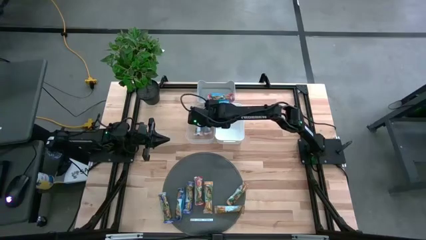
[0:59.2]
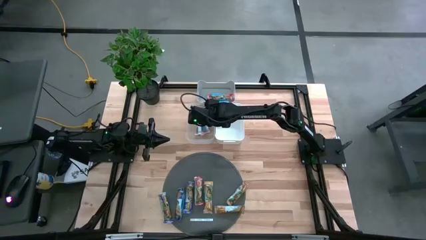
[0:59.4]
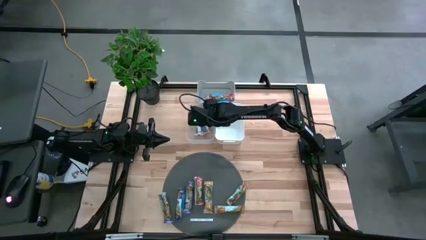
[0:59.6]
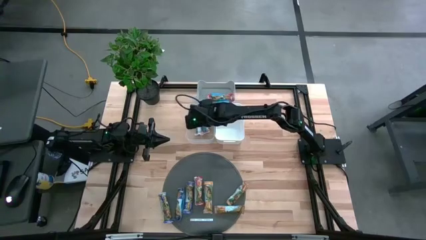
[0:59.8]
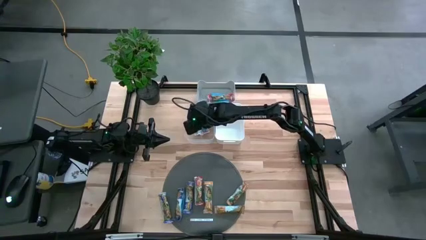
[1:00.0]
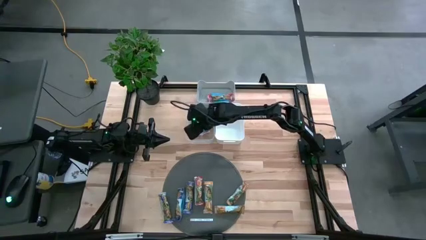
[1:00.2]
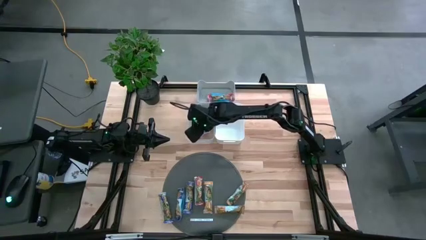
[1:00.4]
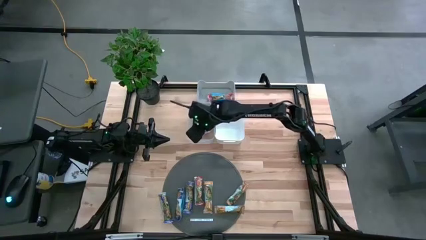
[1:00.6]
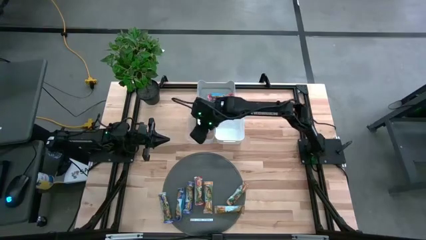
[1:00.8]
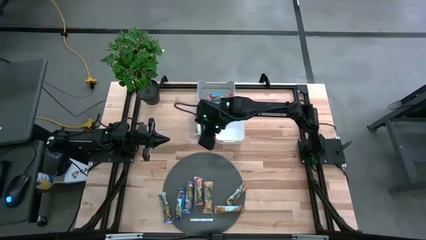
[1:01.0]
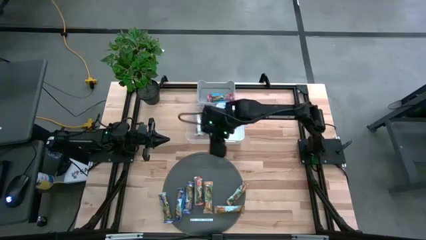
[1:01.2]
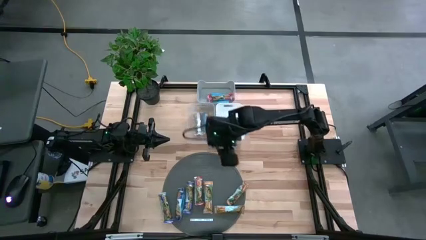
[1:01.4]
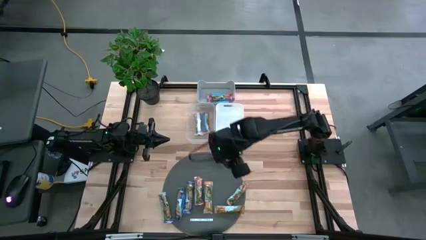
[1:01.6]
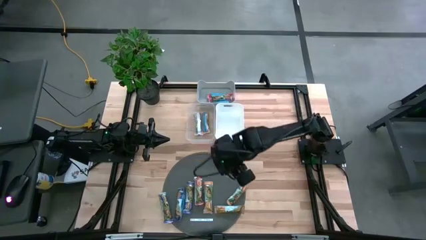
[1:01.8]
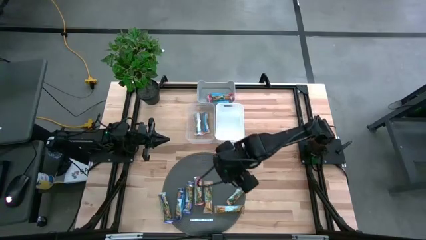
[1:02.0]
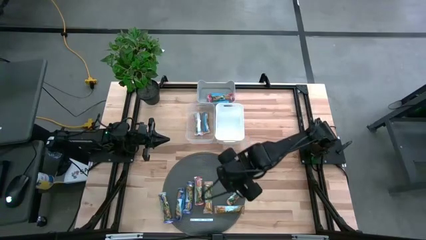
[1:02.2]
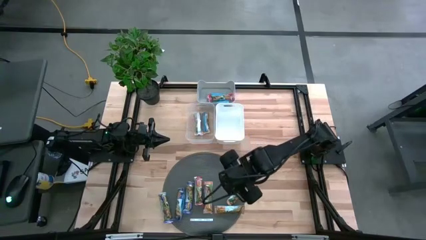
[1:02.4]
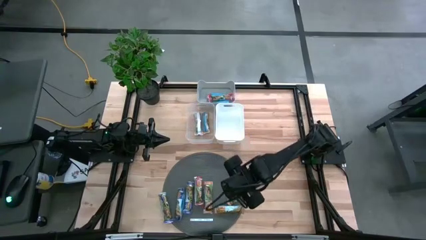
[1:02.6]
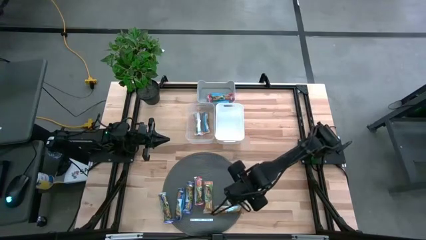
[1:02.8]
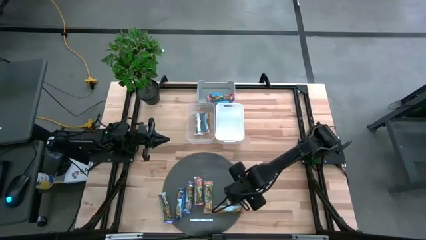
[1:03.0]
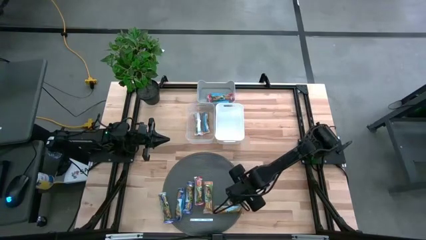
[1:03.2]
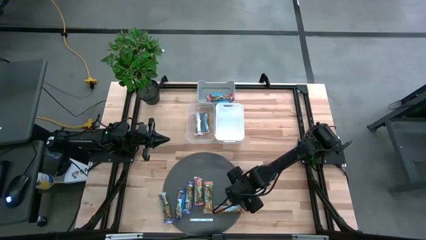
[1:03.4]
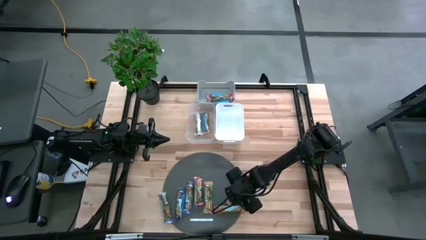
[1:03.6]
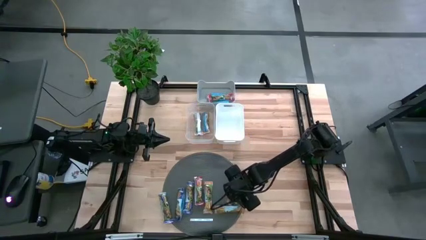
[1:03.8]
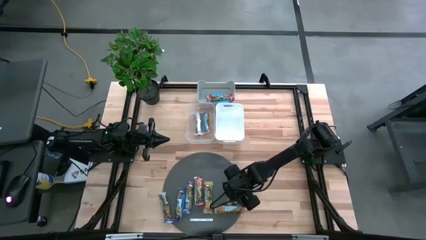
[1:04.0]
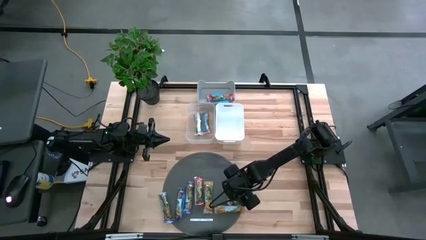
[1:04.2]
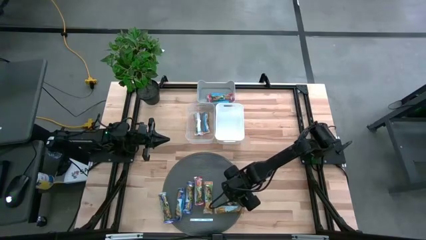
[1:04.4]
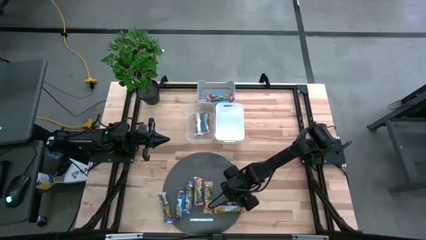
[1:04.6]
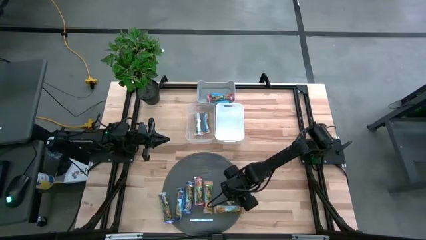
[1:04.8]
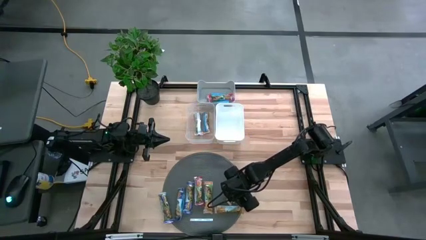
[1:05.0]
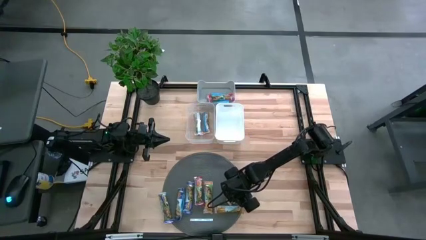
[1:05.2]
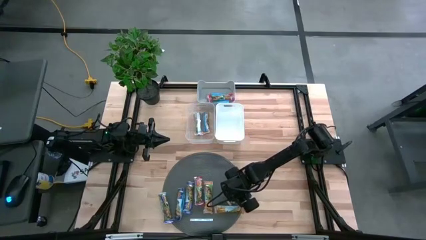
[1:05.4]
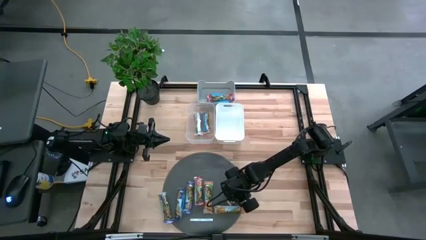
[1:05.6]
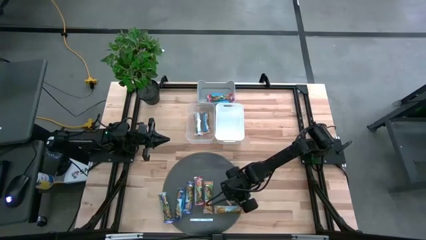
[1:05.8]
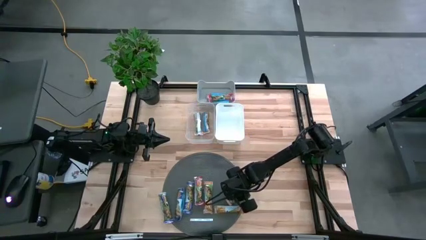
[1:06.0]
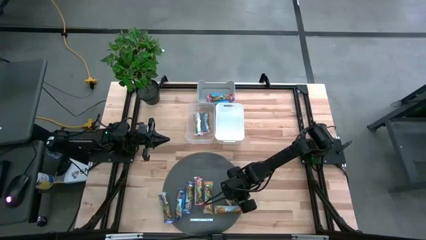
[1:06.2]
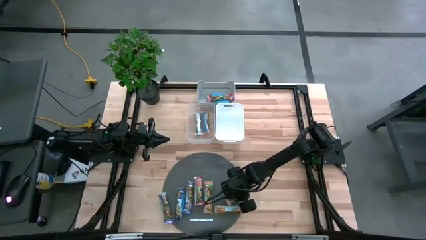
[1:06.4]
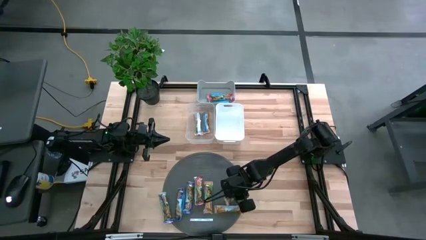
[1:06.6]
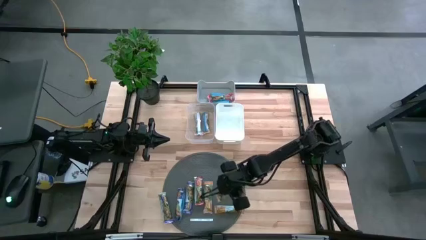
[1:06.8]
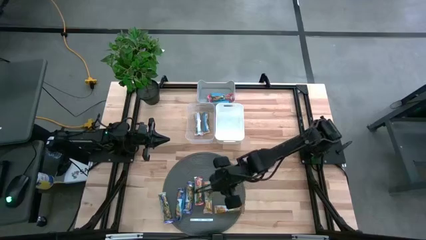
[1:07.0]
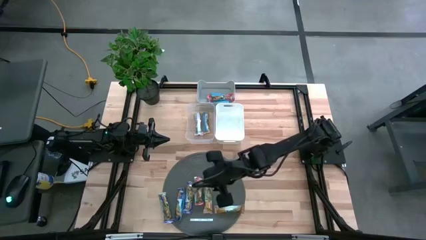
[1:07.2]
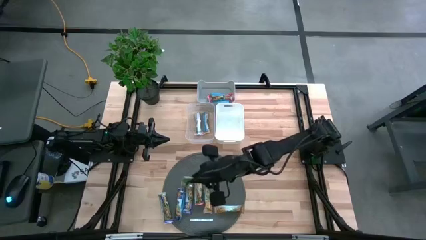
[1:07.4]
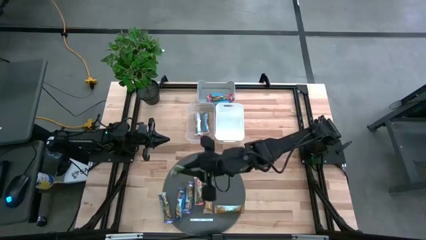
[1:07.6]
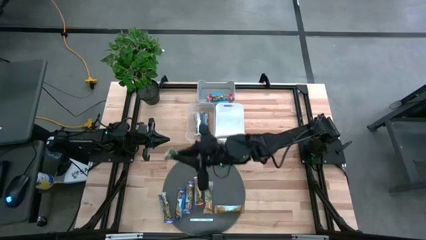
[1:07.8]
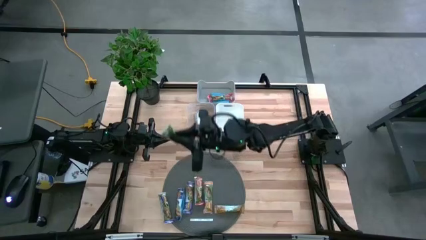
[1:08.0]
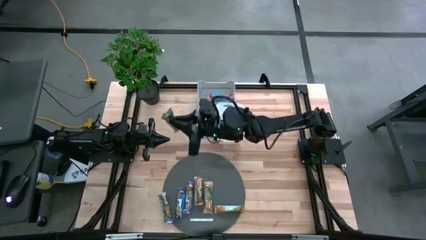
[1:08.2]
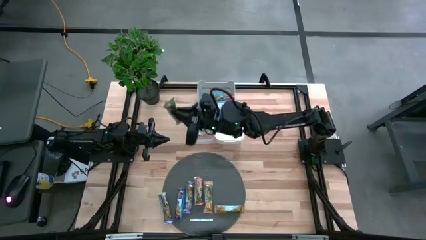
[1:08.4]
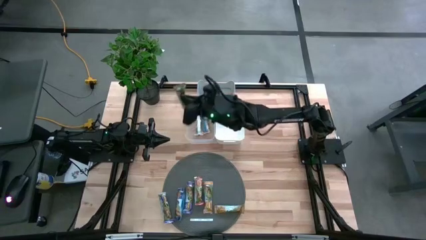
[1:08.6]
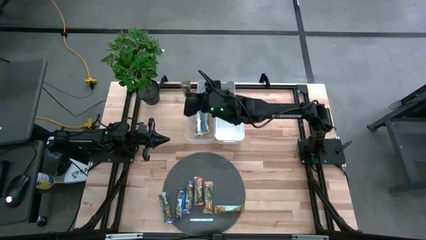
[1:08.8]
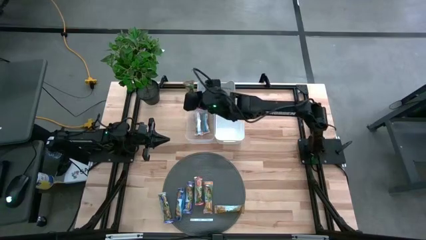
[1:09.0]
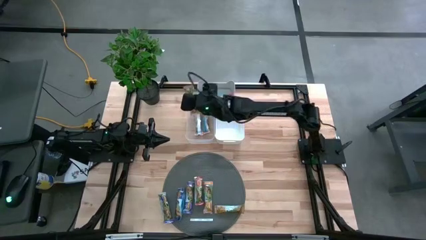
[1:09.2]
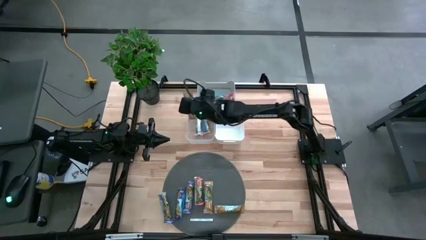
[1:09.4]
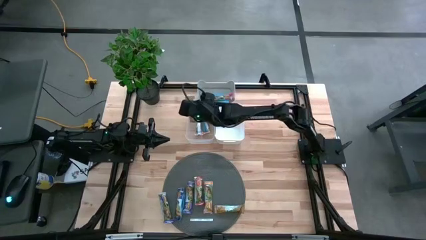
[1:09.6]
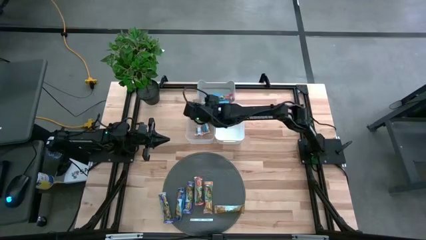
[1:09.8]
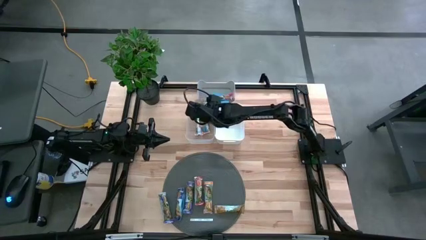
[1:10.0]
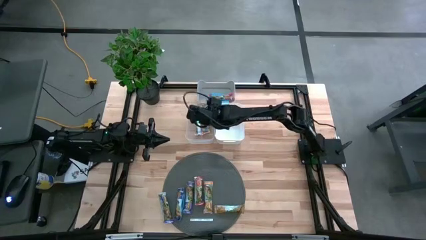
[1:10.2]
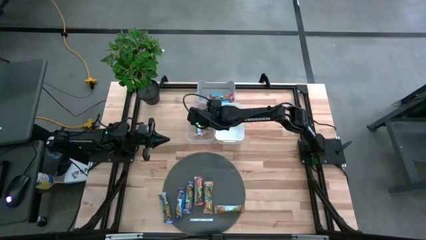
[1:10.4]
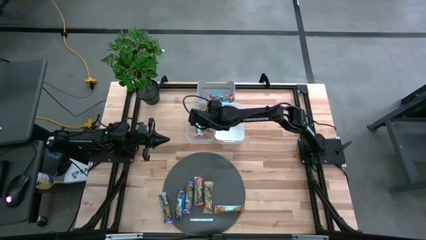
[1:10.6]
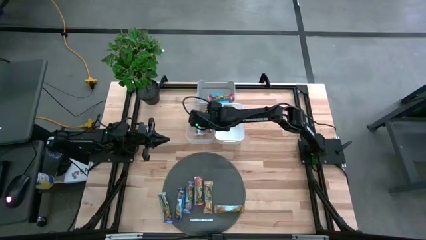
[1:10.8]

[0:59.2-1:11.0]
Task: Pick and place Granola Bars by type
Put the yellow granola bar into the transparent bin
